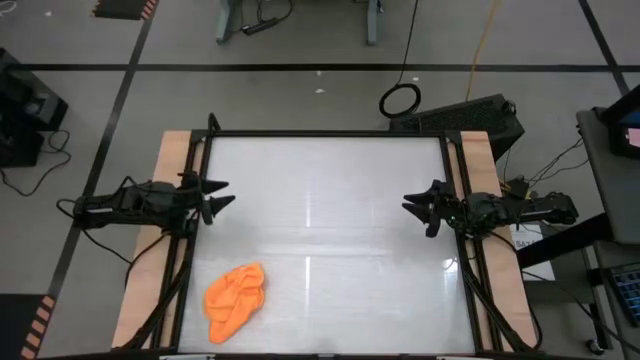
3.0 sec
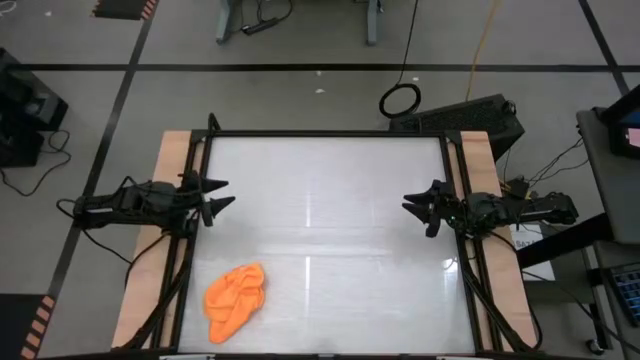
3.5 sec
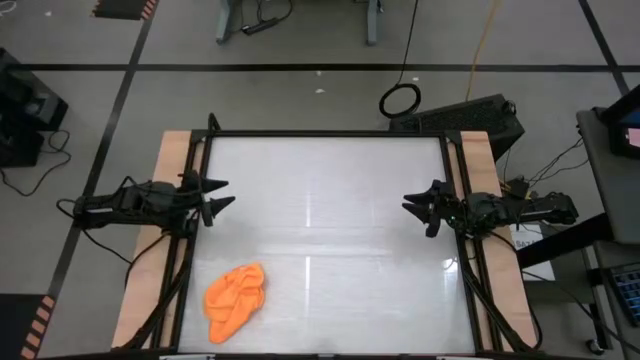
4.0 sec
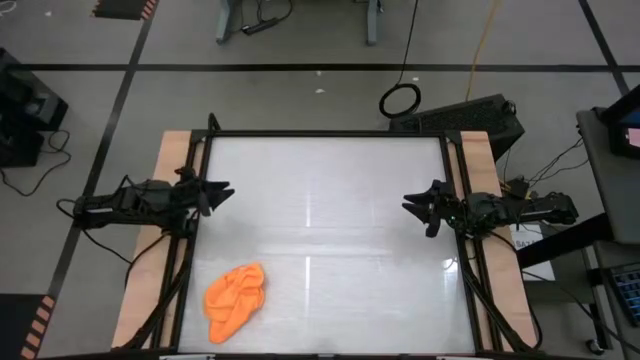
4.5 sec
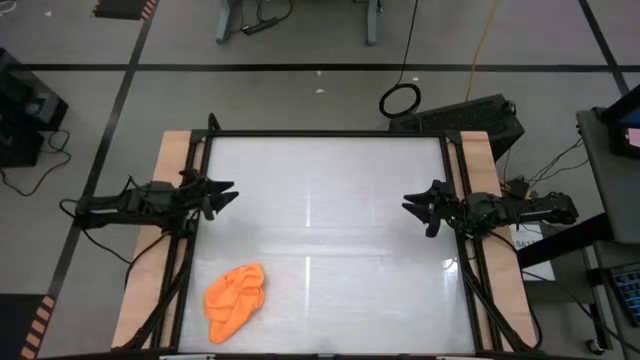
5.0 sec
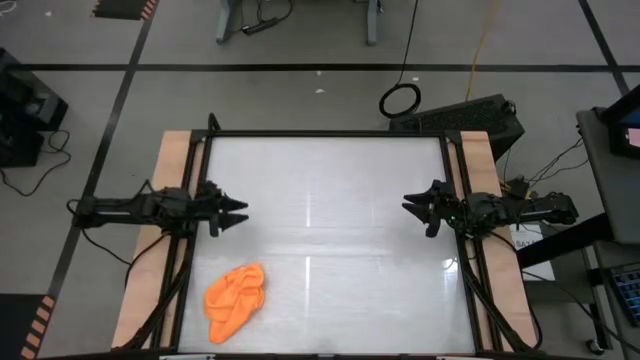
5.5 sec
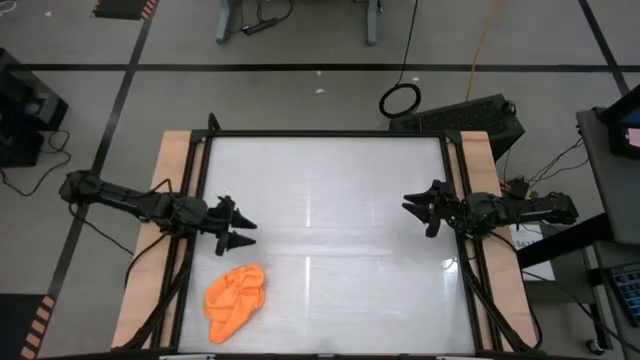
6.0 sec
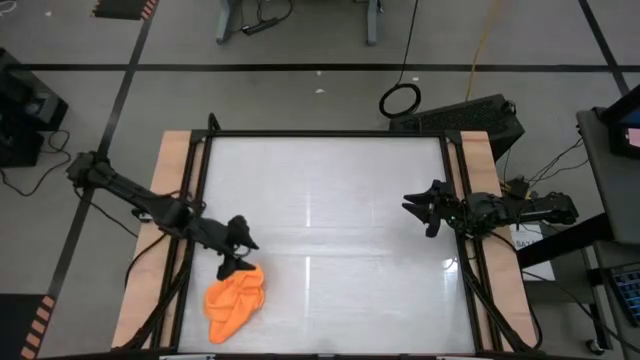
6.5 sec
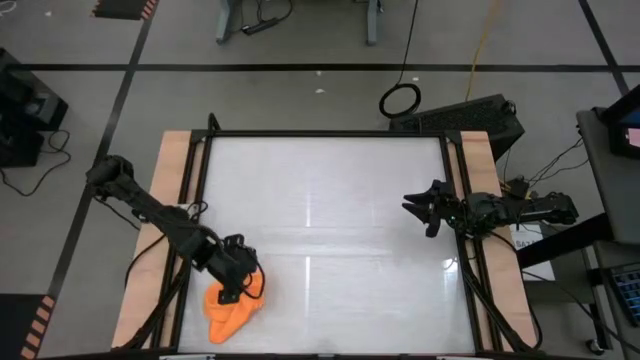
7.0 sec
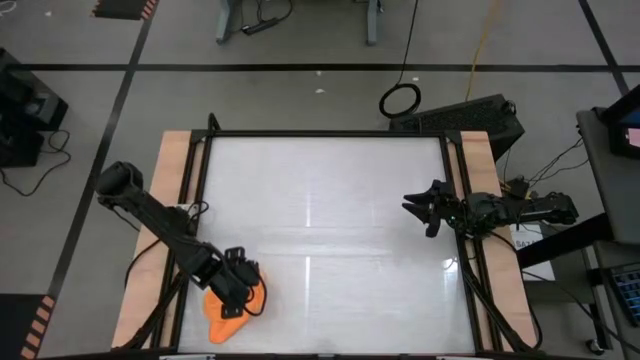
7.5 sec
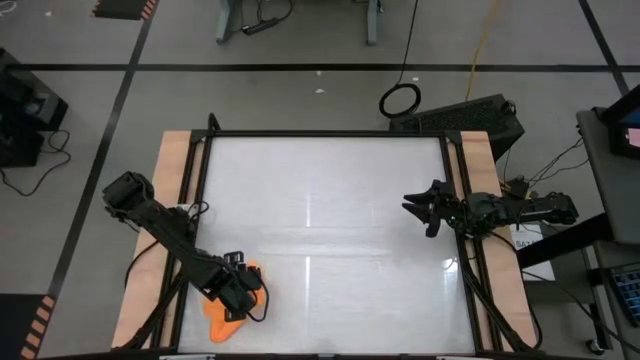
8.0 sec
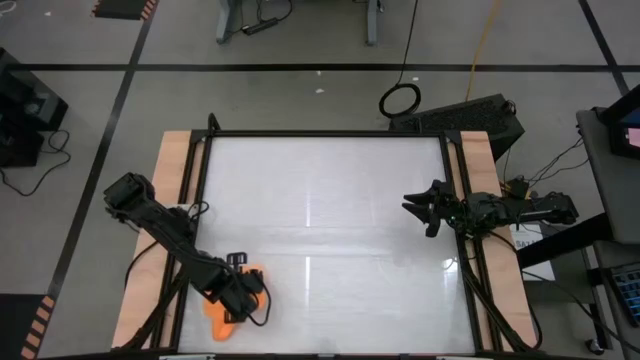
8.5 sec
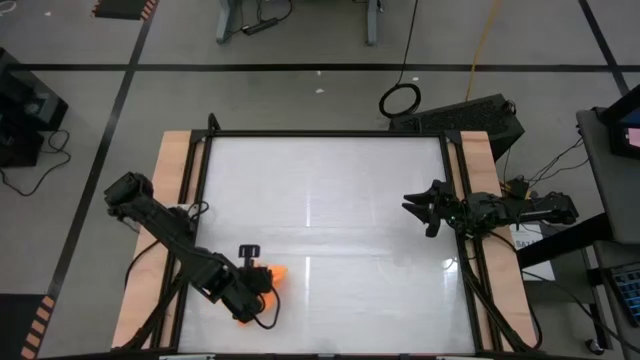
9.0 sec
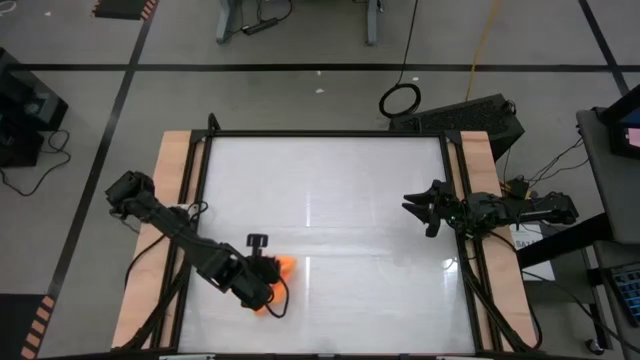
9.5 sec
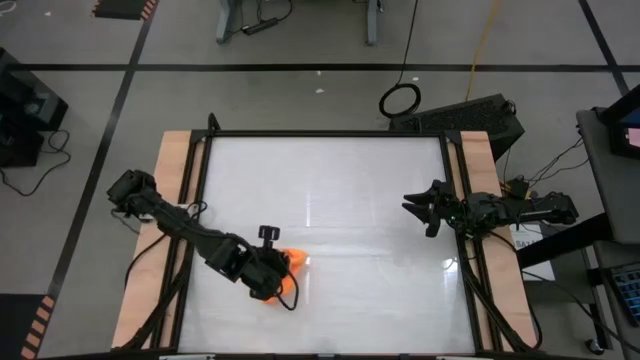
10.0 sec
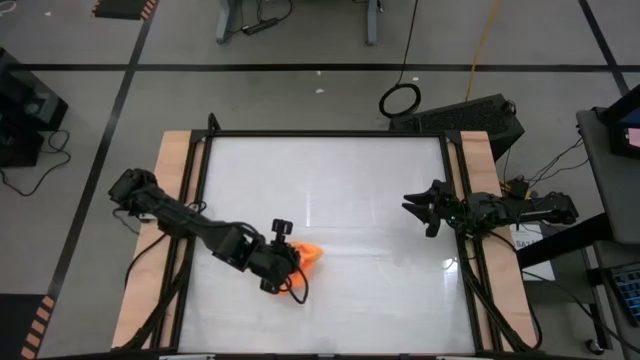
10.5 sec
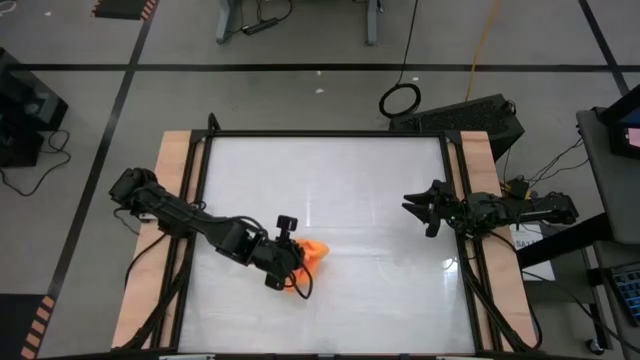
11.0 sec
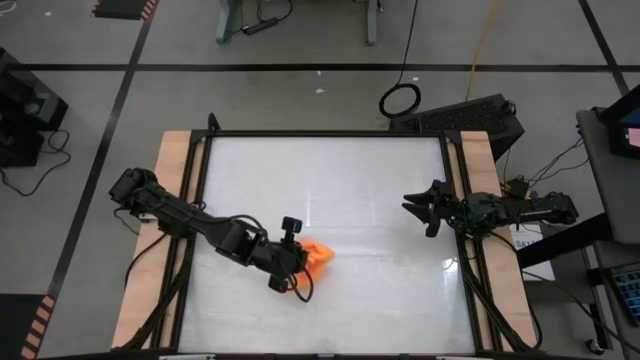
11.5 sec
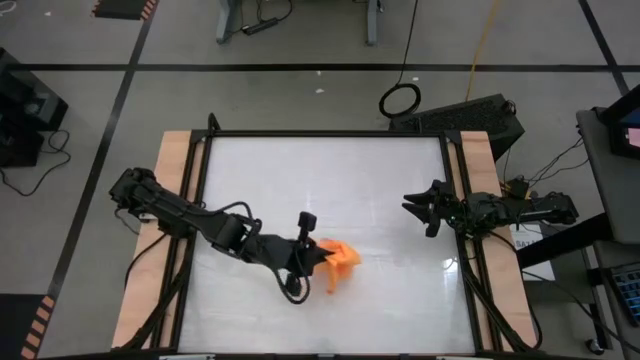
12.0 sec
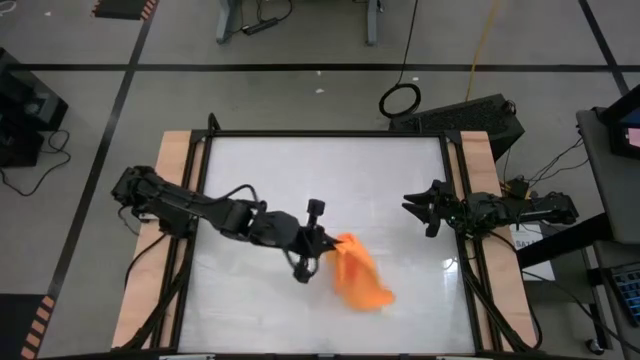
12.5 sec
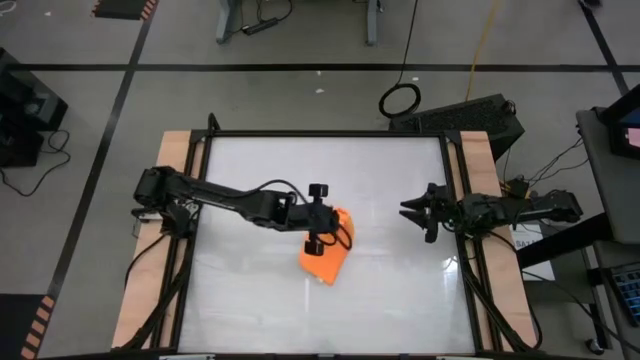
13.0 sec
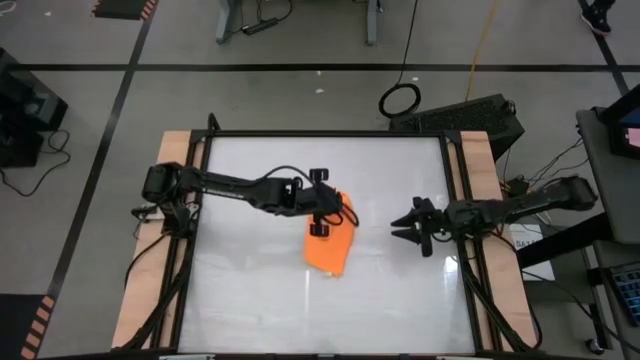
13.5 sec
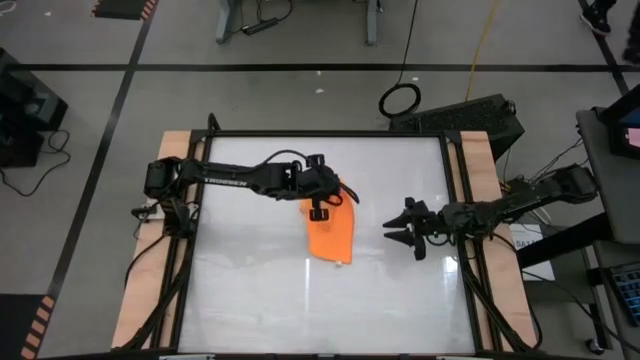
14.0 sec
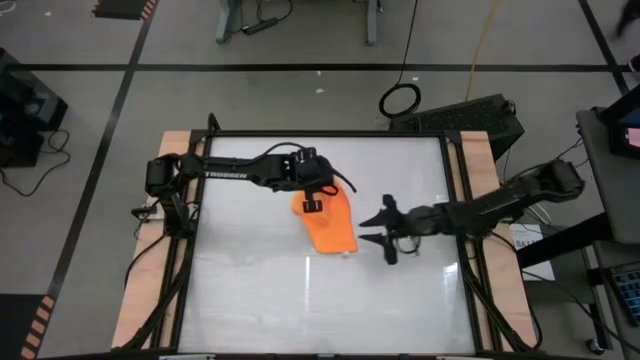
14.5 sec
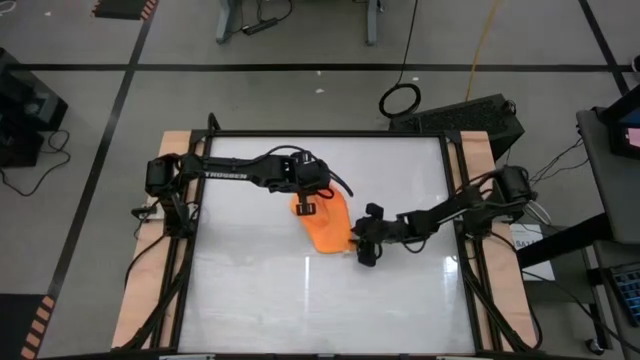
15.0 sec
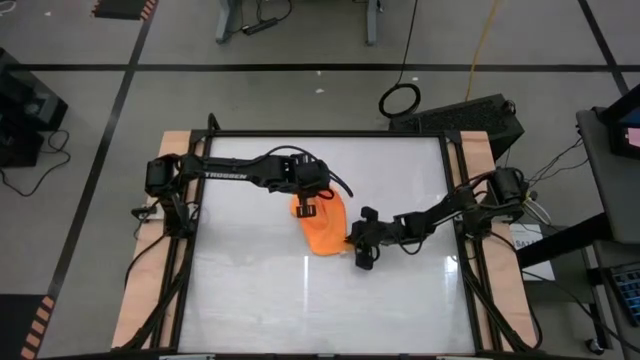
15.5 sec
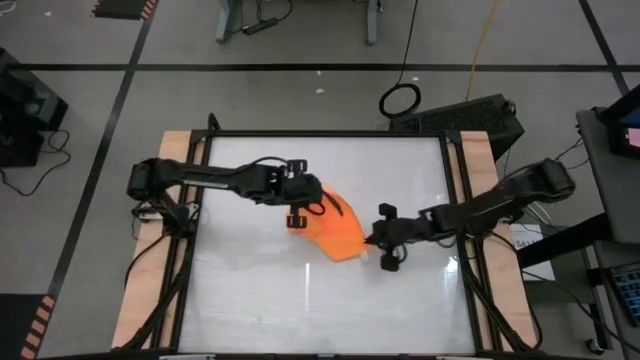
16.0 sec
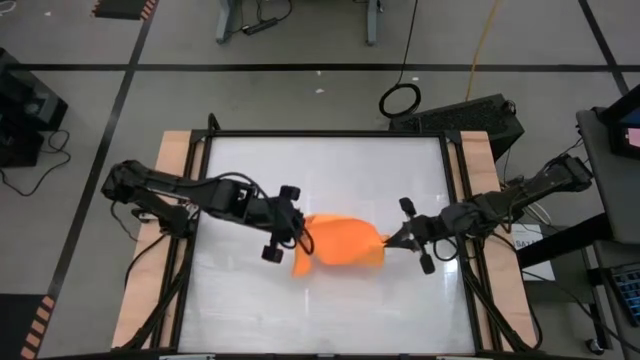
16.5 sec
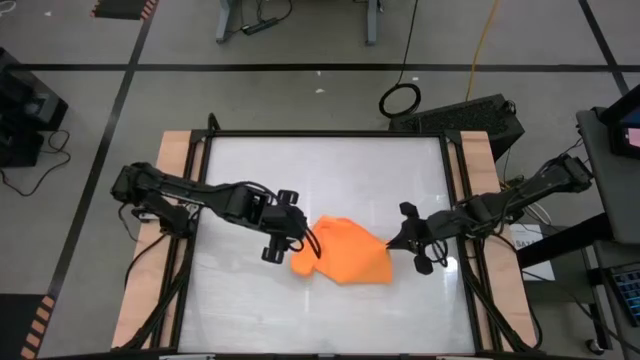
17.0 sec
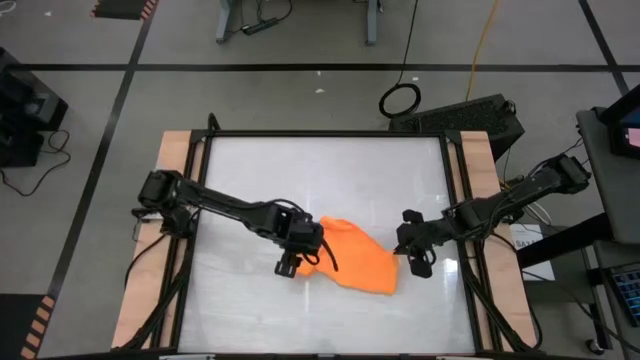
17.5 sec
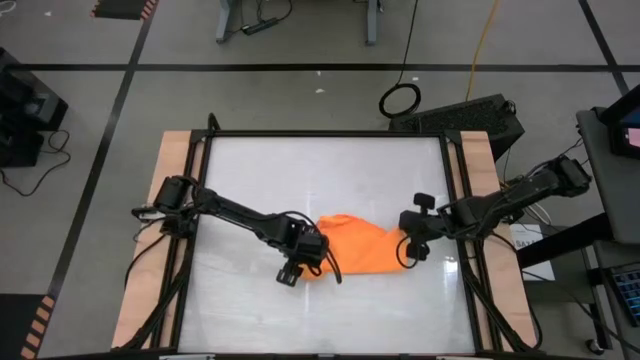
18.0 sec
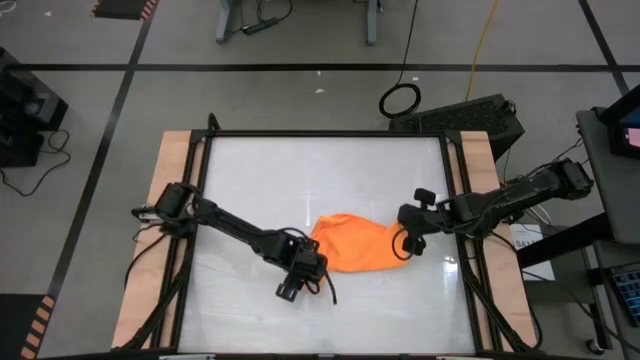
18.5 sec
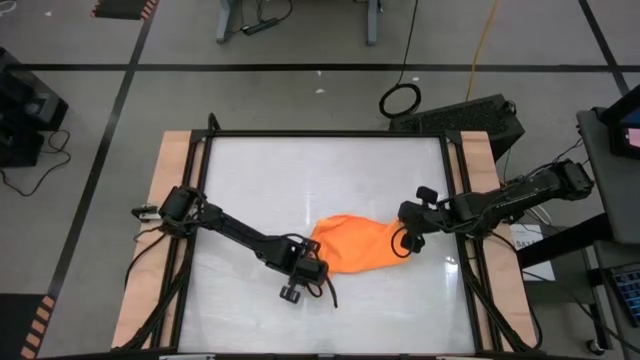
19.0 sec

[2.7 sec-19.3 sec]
Task: Roll towel
Fold the towel

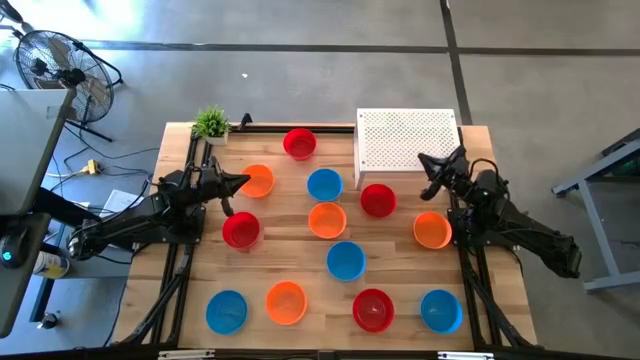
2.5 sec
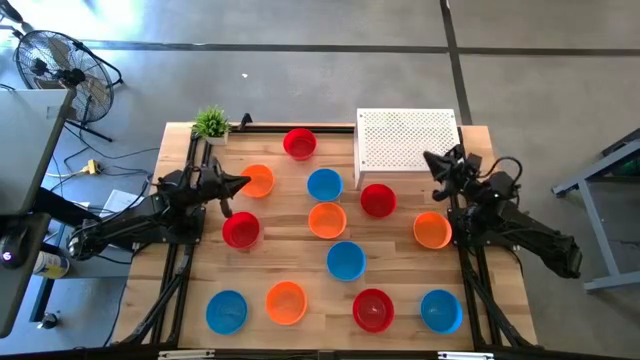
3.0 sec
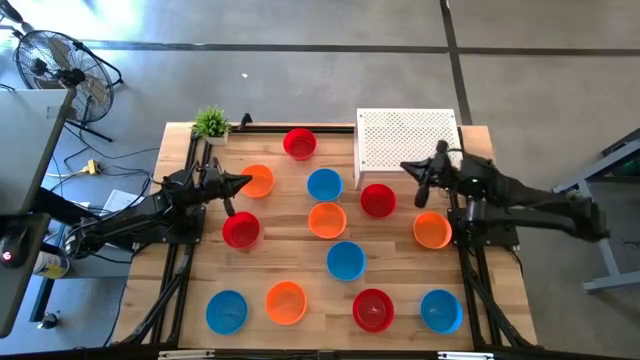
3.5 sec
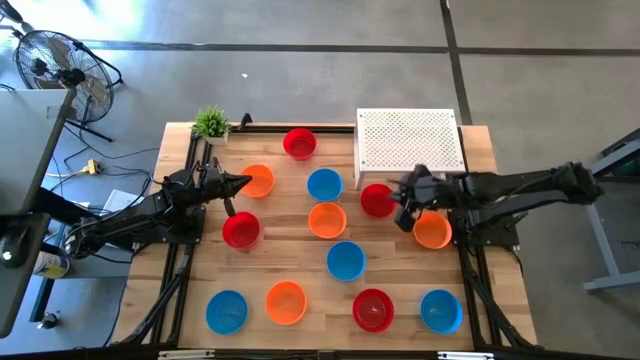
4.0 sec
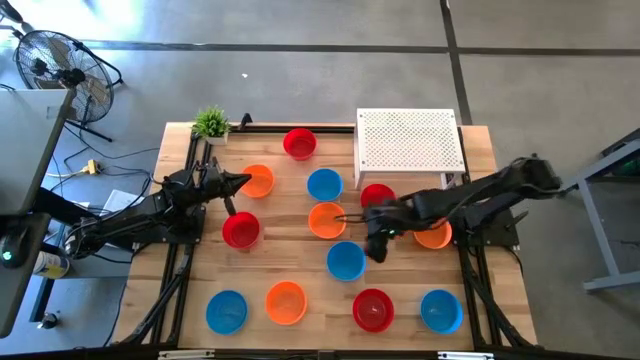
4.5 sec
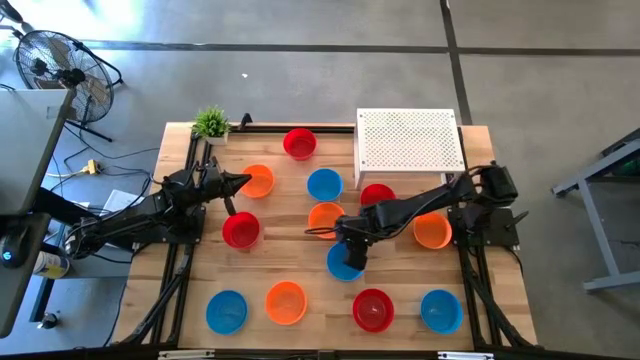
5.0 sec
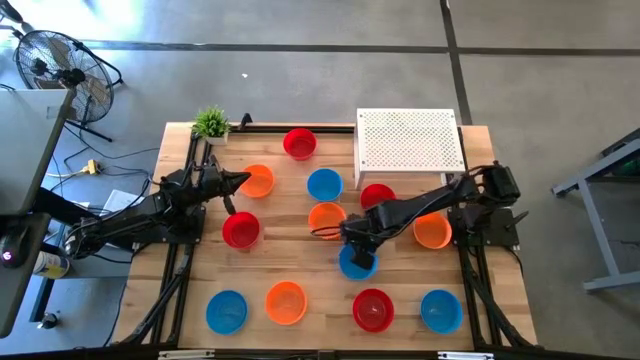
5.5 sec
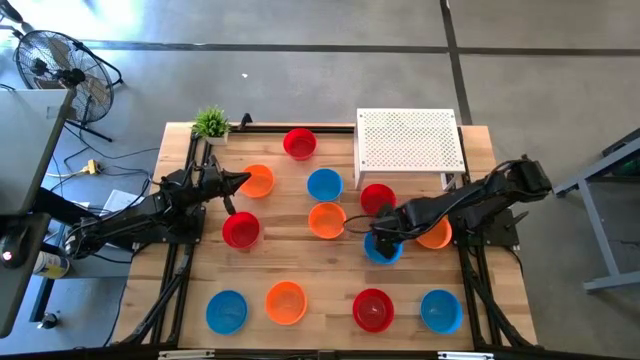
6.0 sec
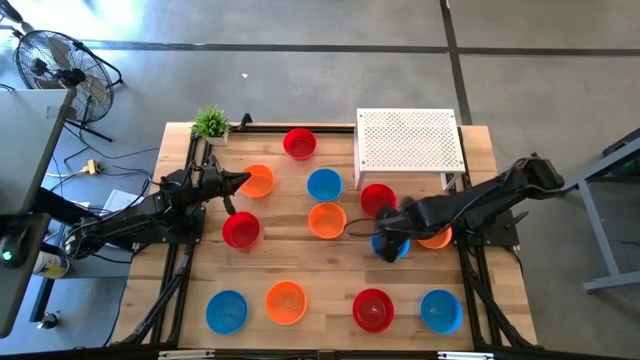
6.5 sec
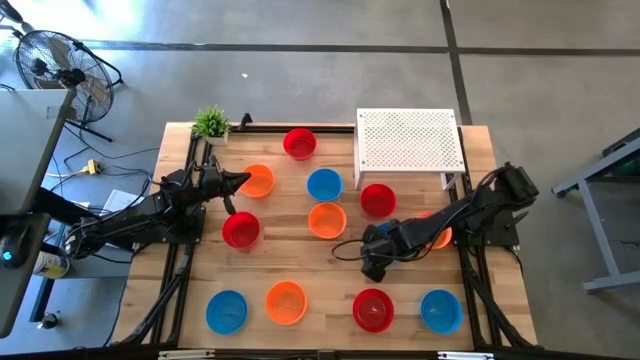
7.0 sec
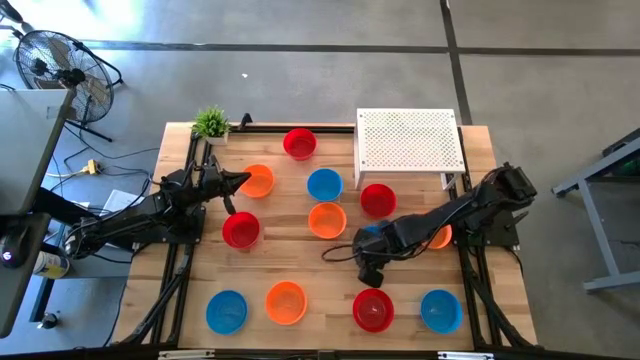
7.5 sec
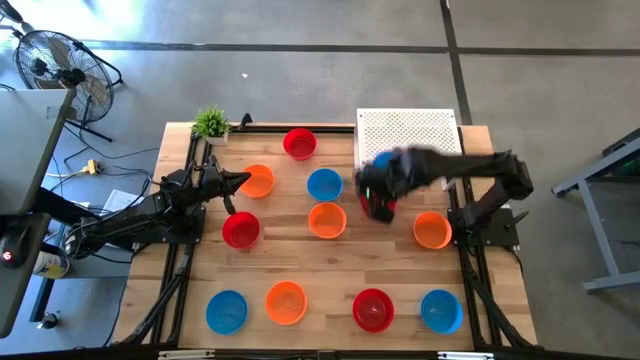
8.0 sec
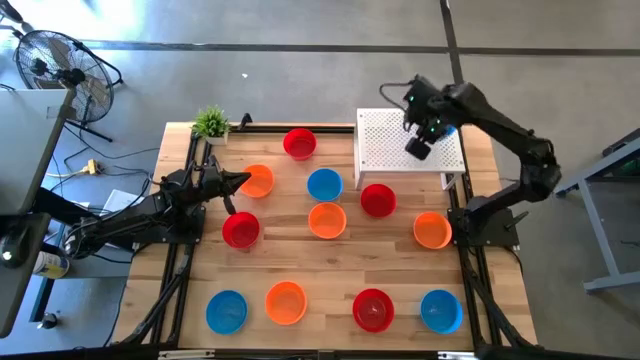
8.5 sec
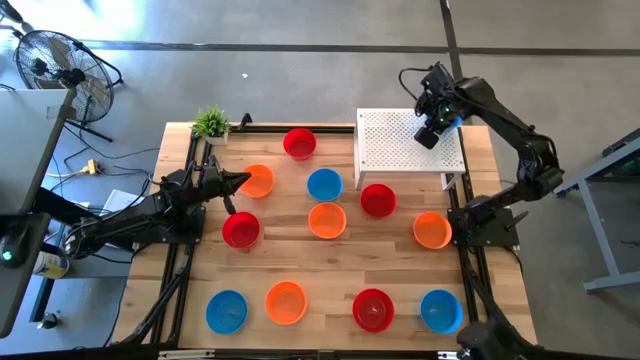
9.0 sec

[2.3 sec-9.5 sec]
Task: Pick & Place Mini bowls
Put the blue bowl on the shelf
